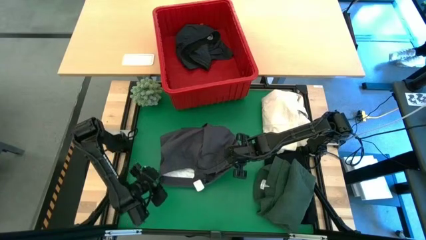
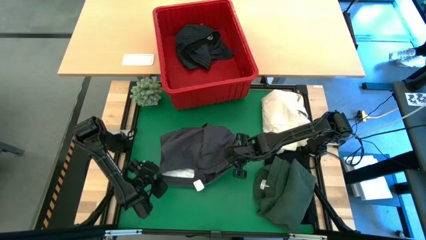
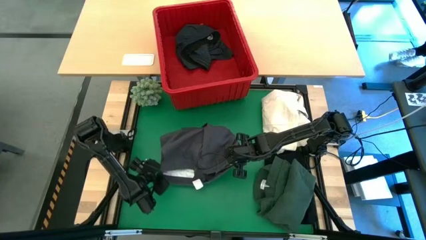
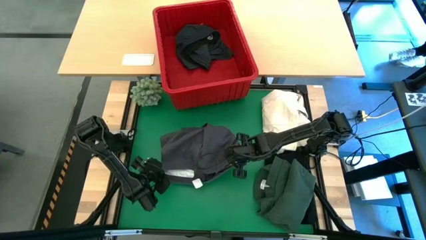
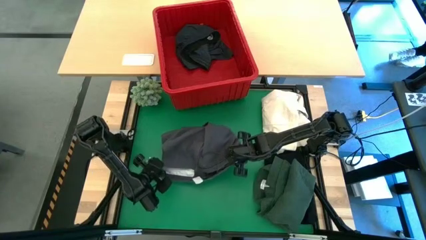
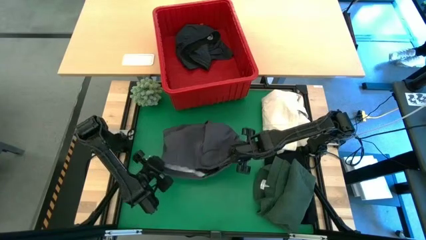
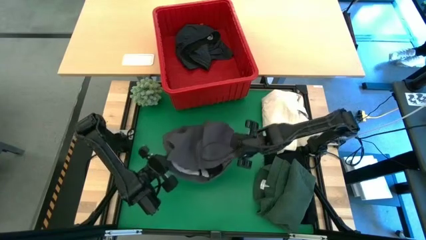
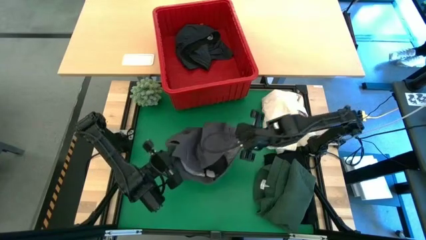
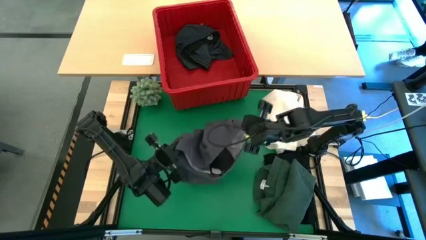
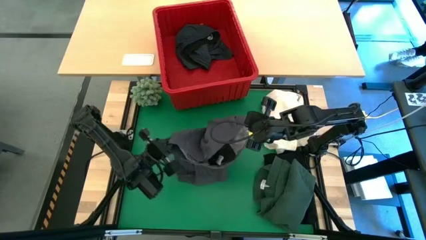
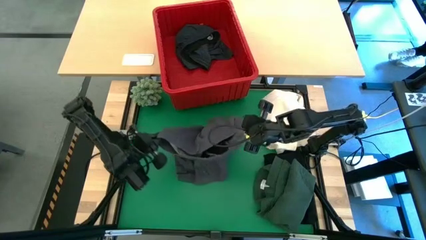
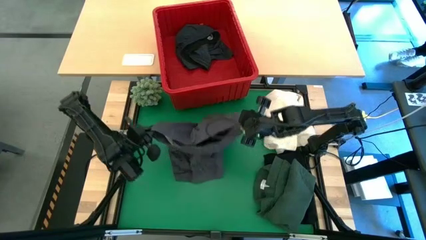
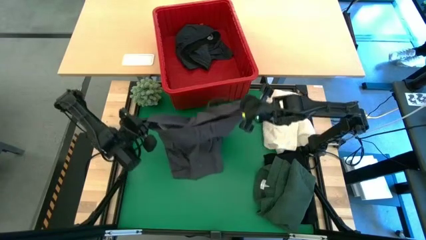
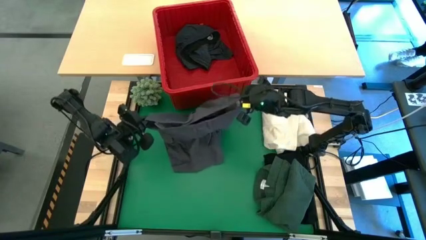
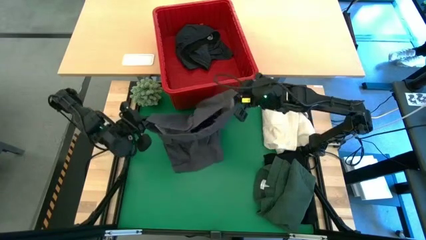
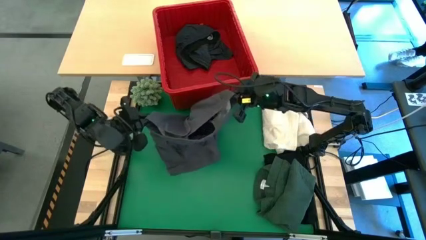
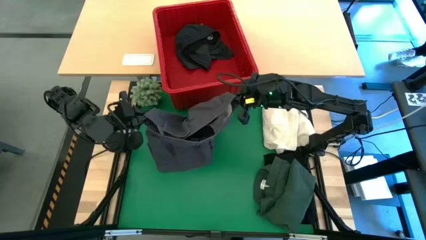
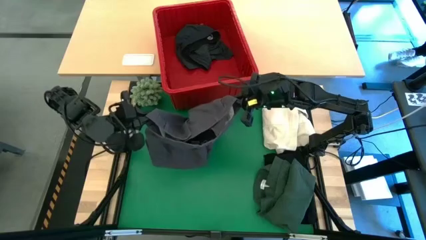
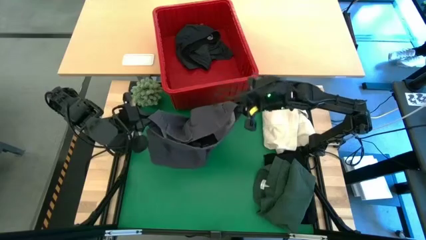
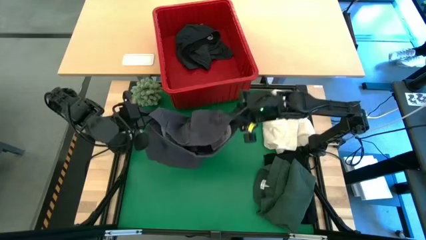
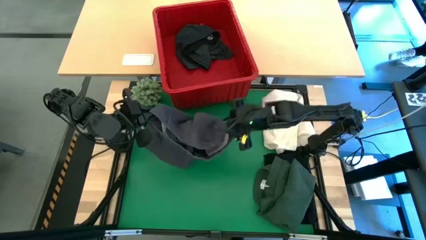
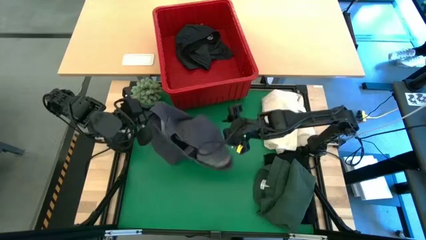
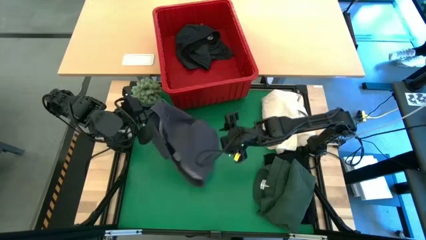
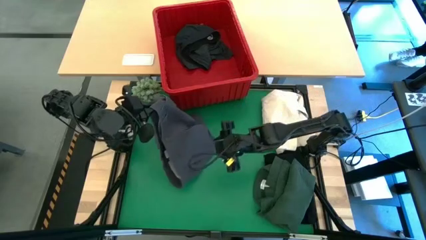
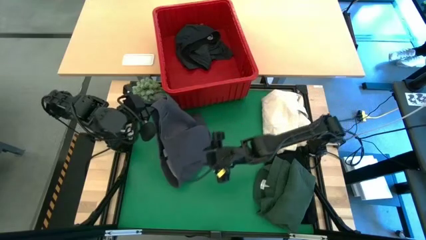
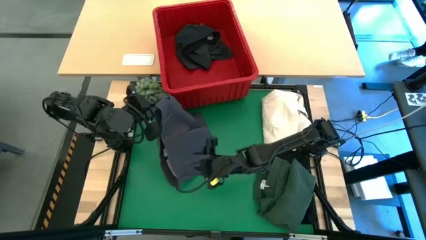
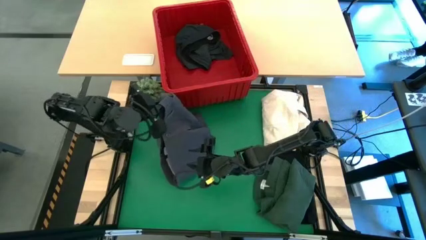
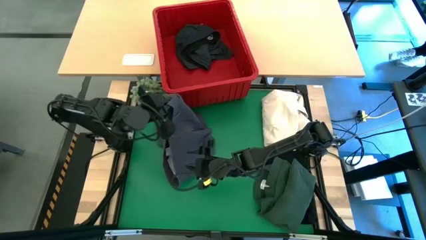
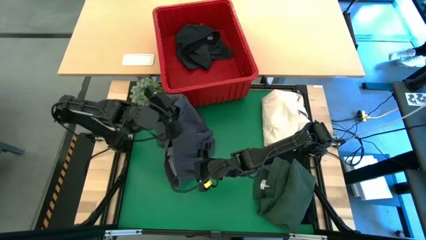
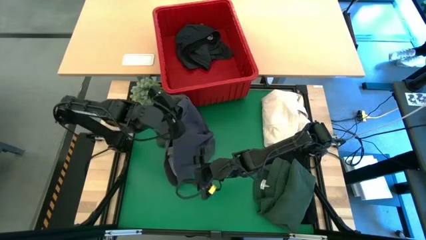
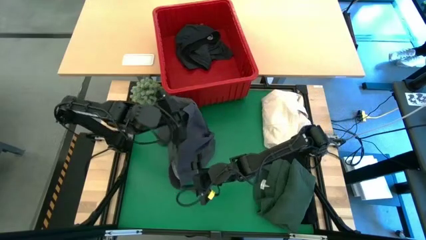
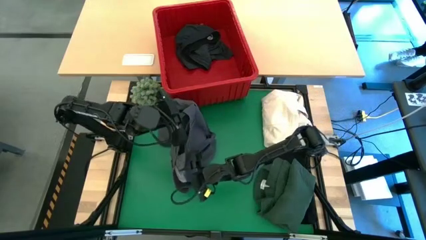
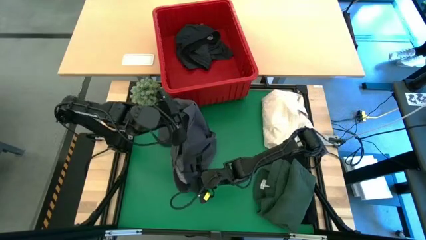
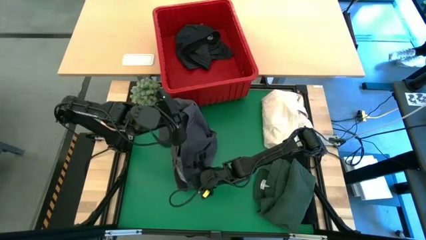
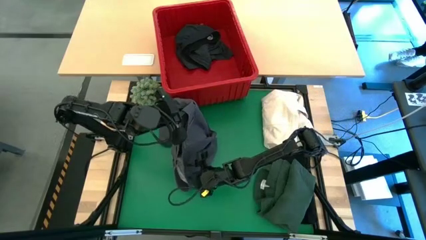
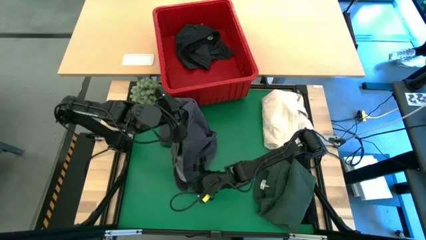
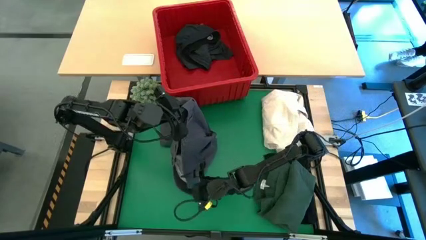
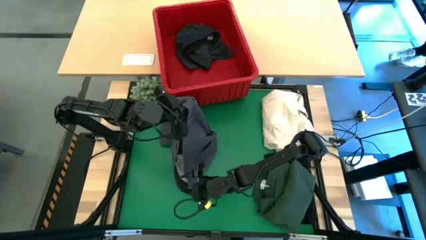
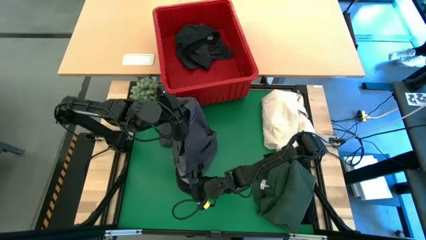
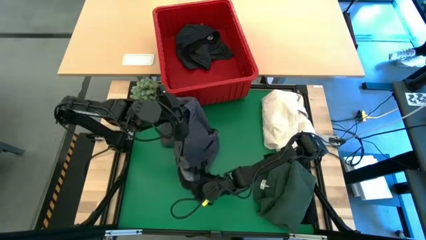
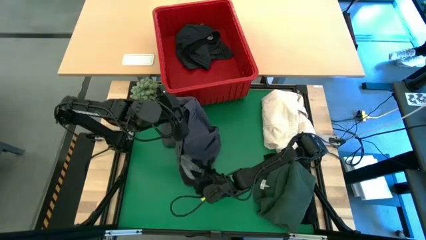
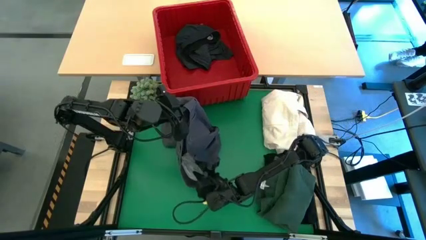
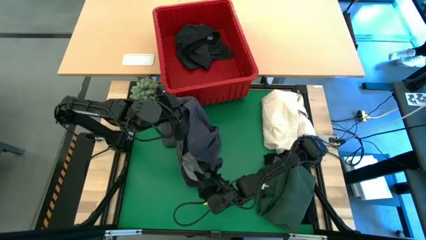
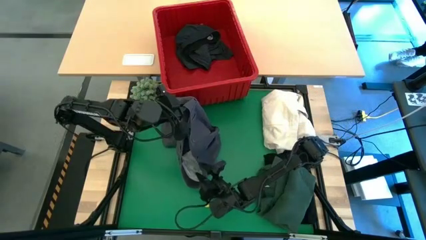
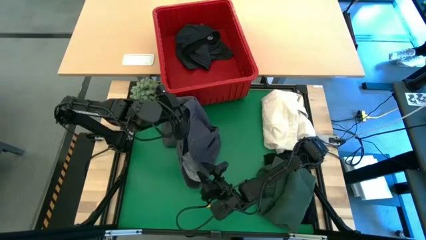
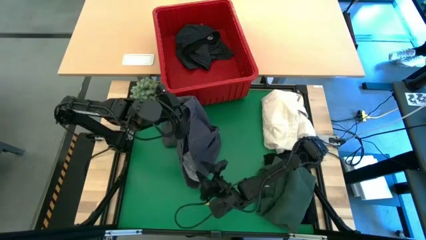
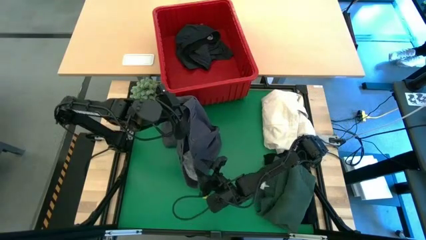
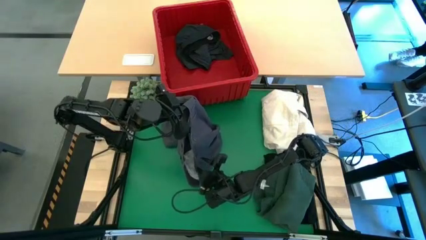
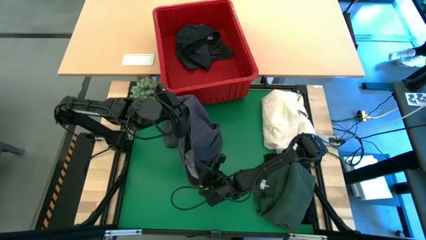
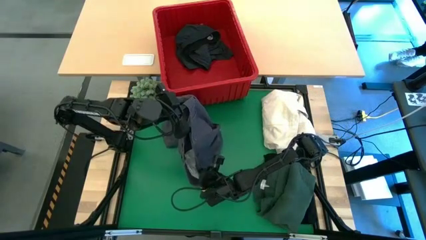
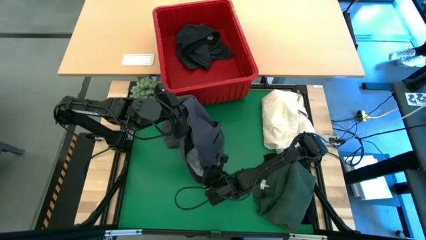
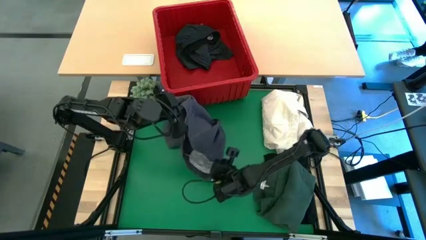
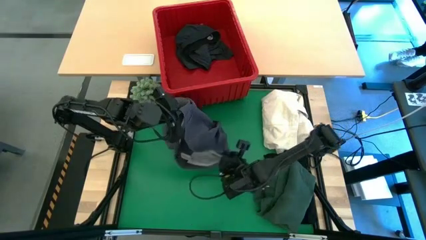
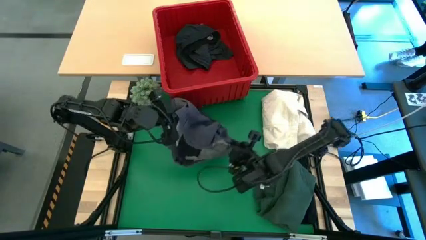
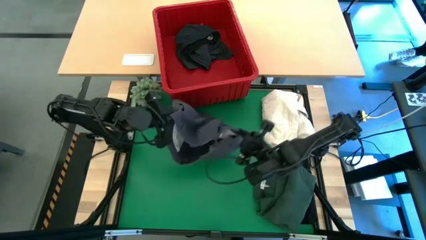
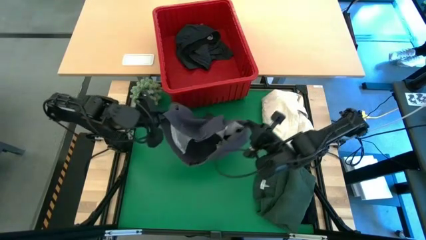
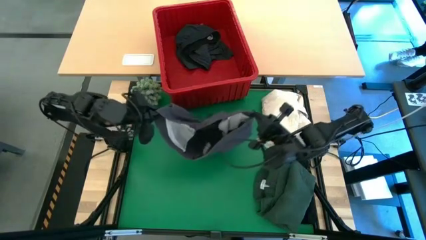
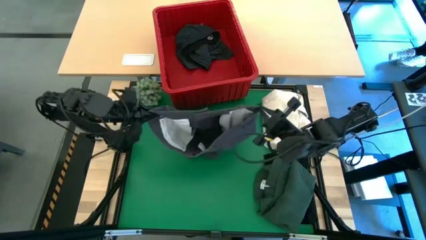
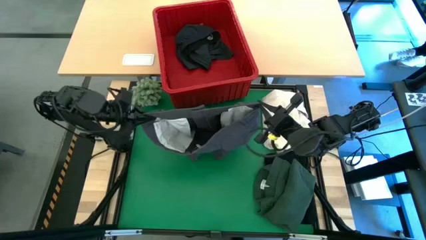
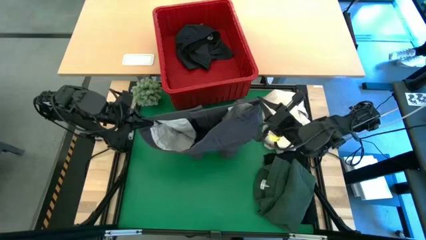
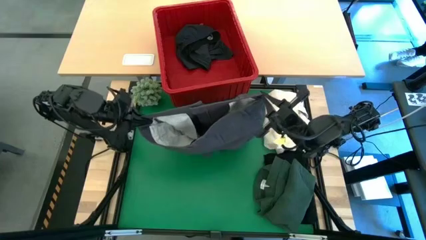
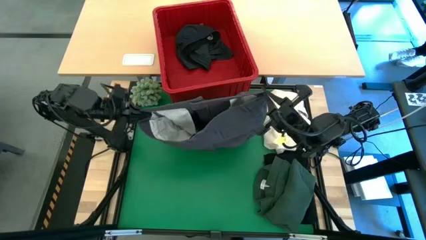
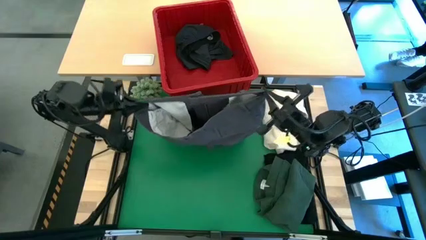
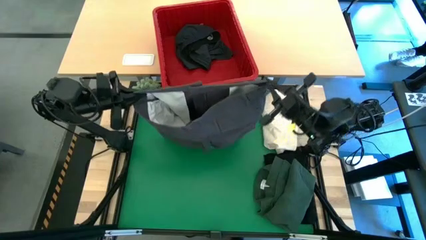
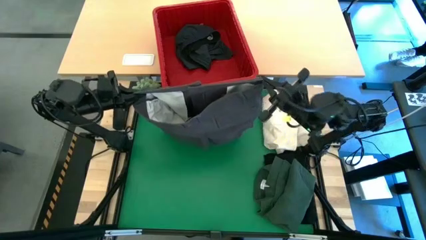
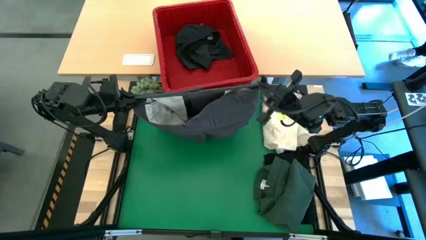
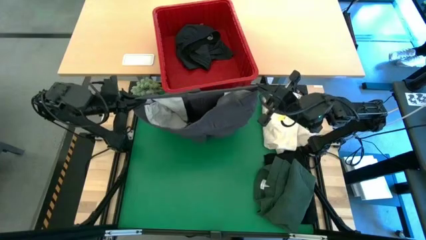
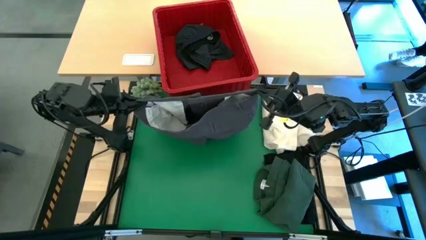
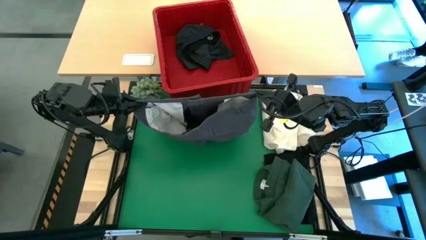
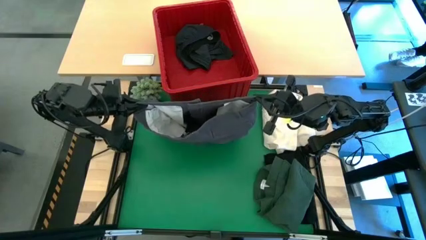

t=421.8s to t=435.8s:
Task: Fold laundry
Fold the gray pants

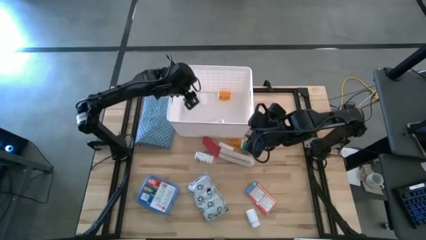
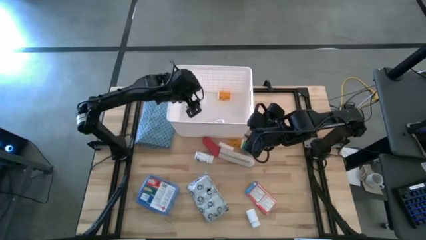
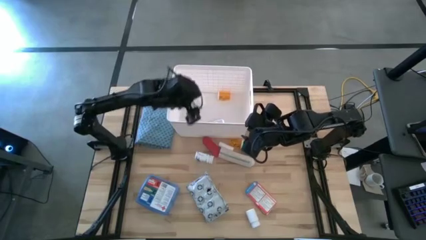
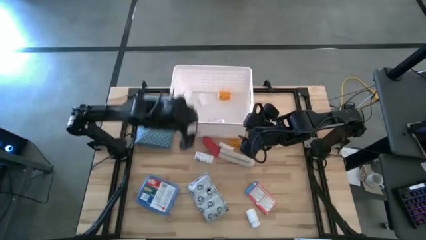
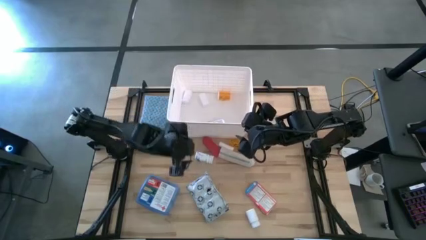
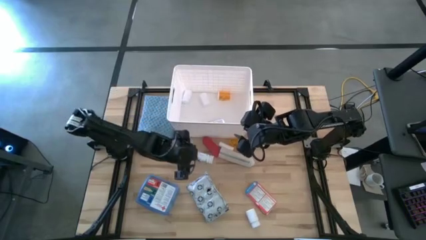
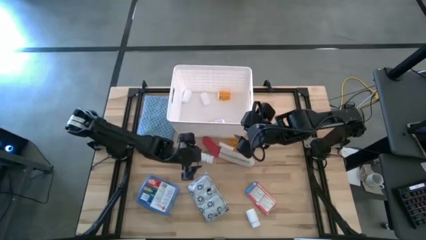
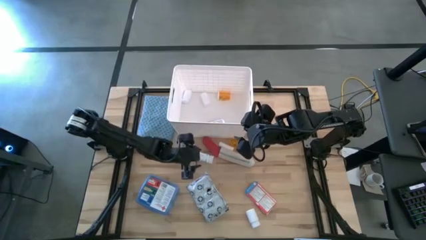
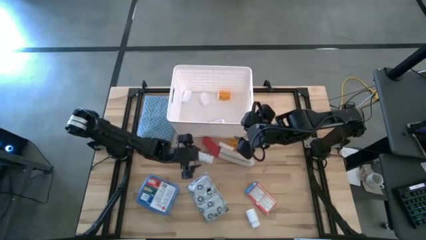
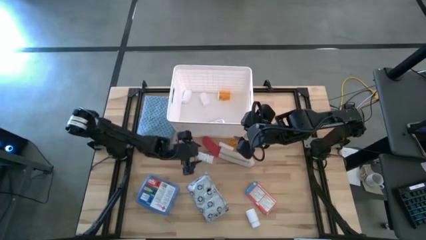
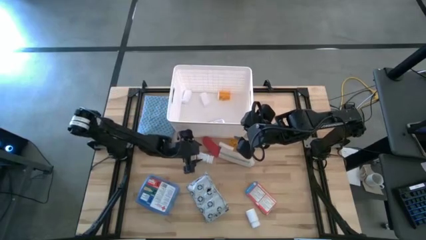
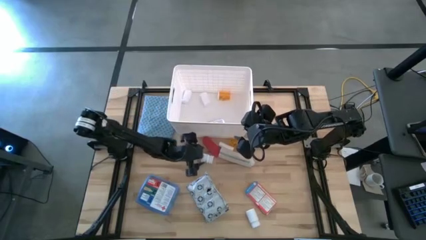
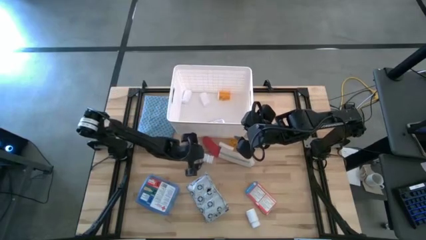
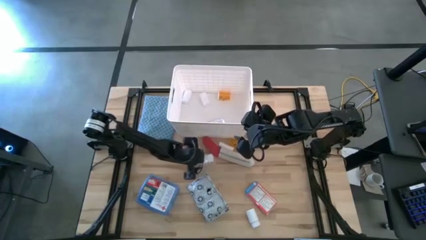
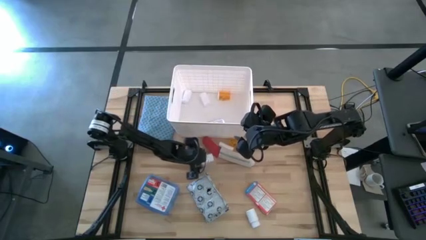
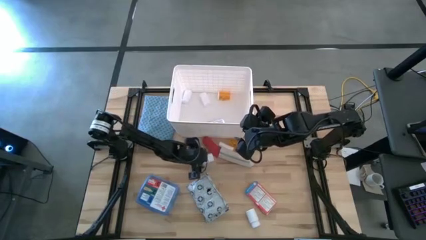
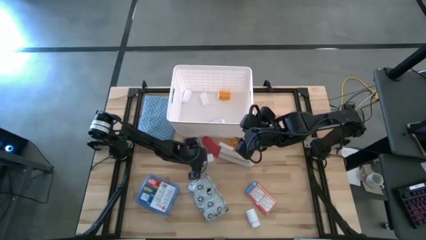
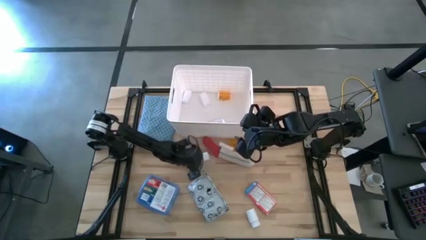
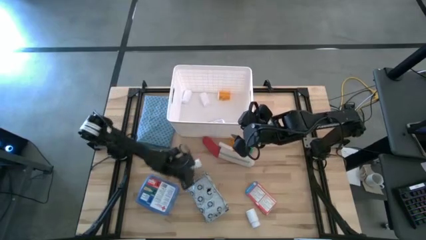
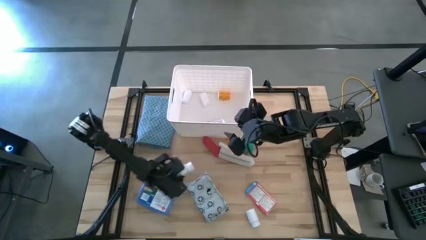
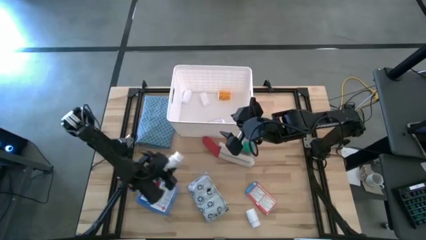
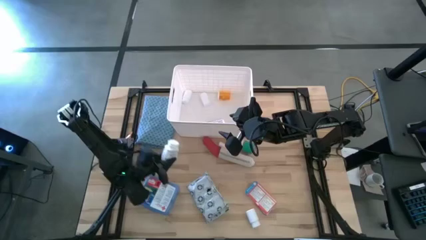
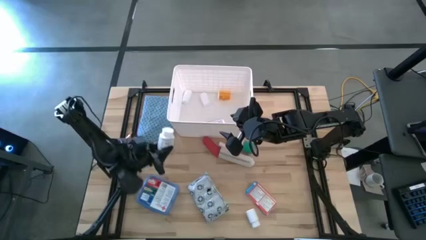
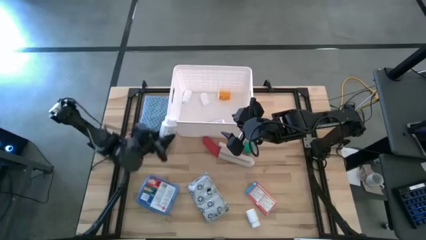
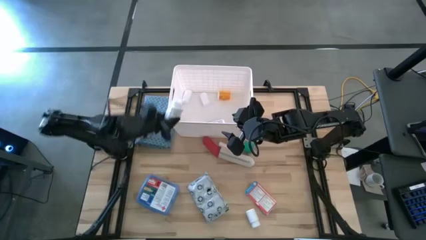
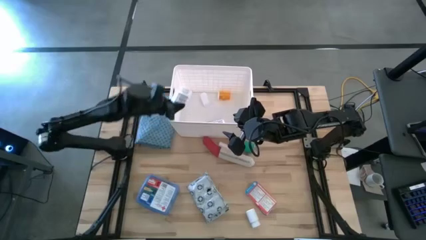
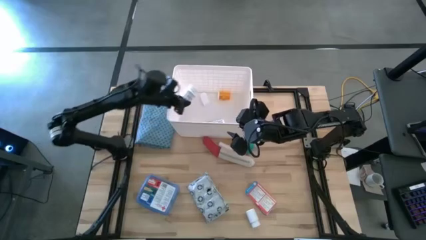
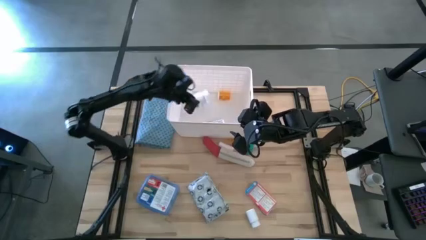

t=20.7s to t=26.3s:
Task: Pick & place medical supplies in basket/bin
Put the white and blue medicine bottle in the white bin
